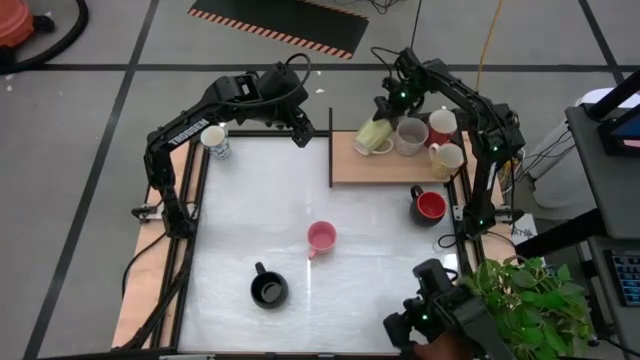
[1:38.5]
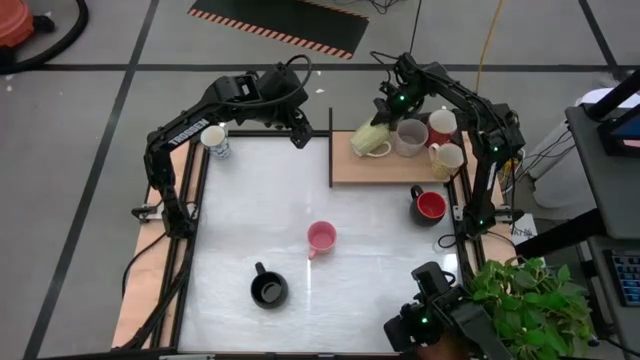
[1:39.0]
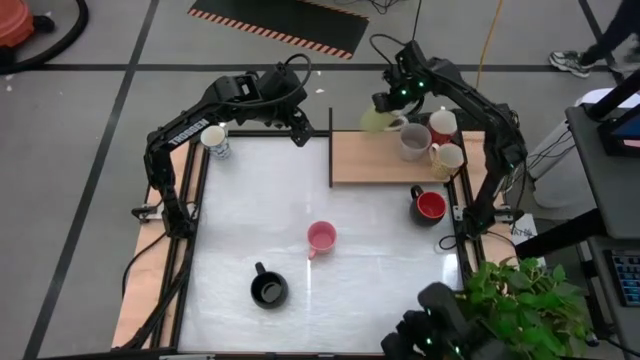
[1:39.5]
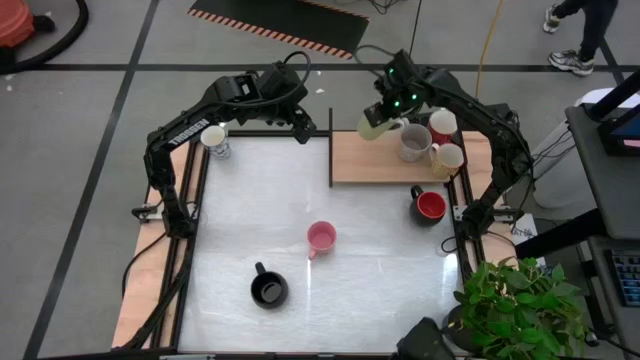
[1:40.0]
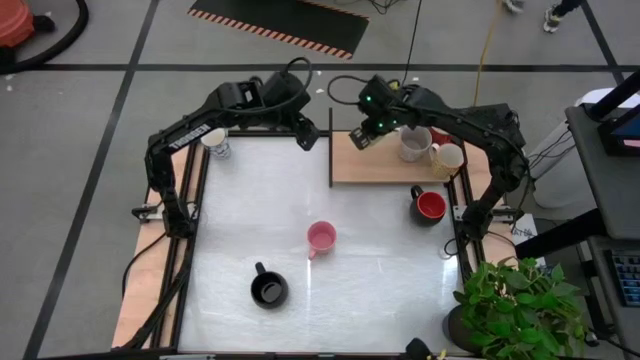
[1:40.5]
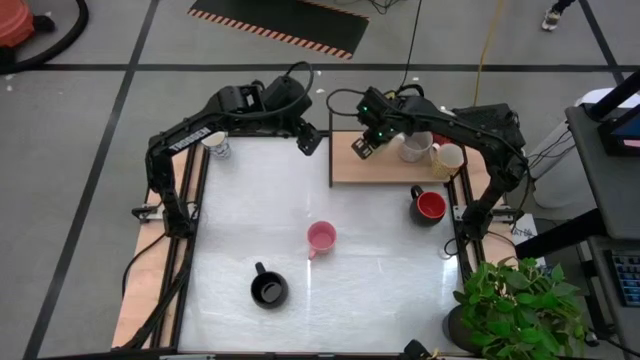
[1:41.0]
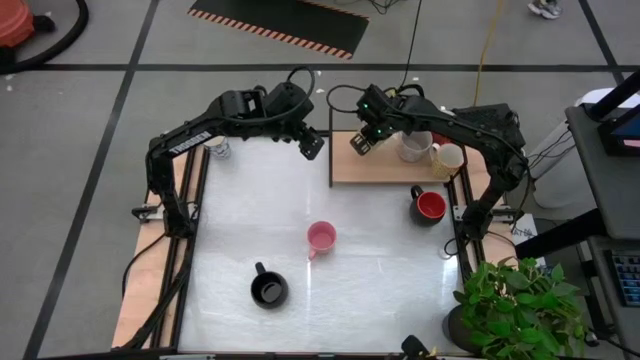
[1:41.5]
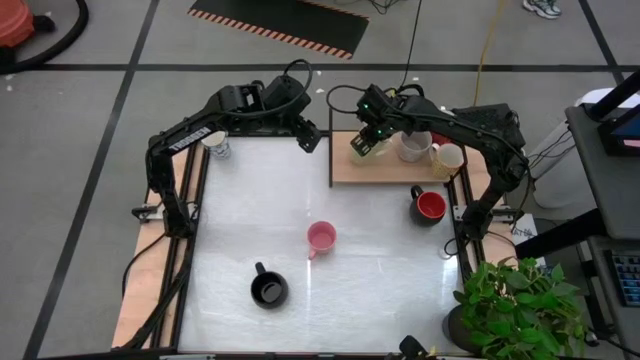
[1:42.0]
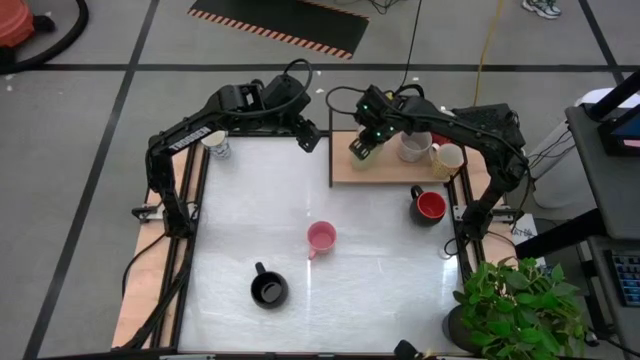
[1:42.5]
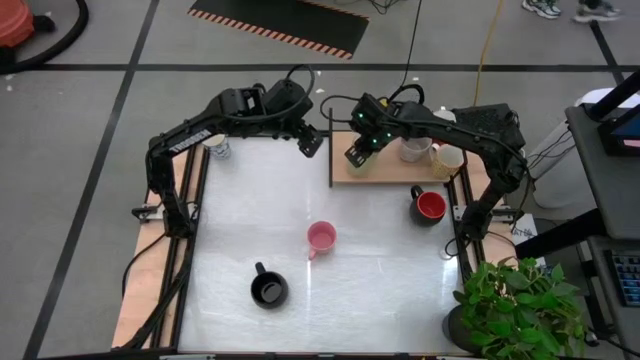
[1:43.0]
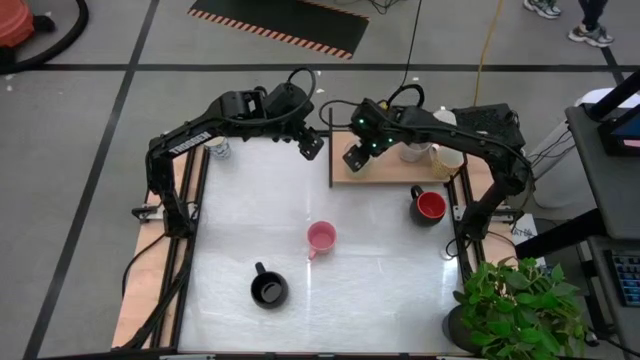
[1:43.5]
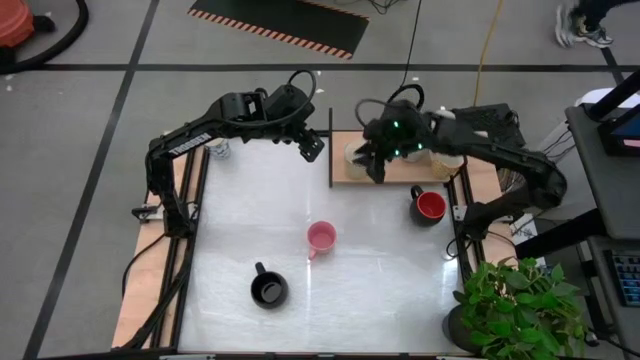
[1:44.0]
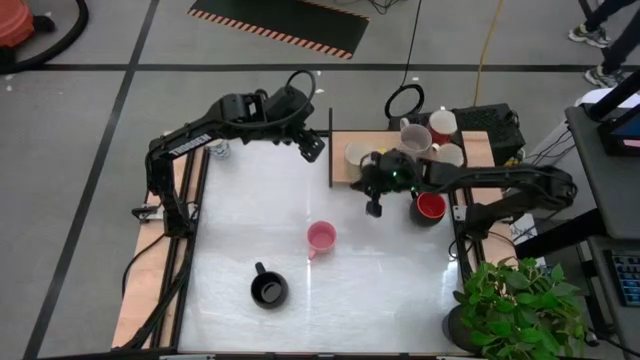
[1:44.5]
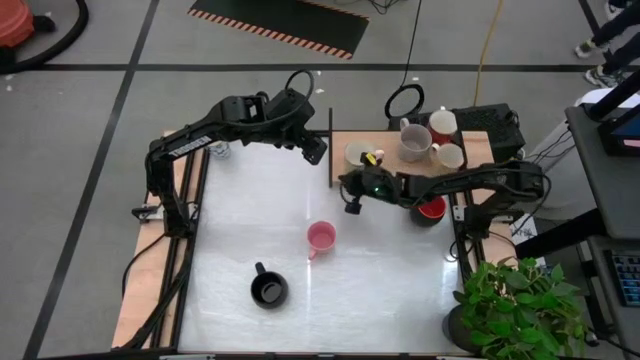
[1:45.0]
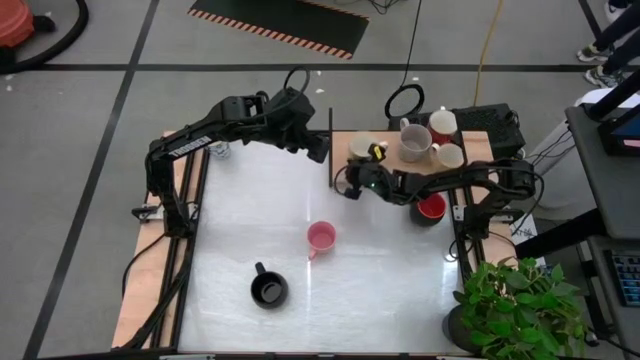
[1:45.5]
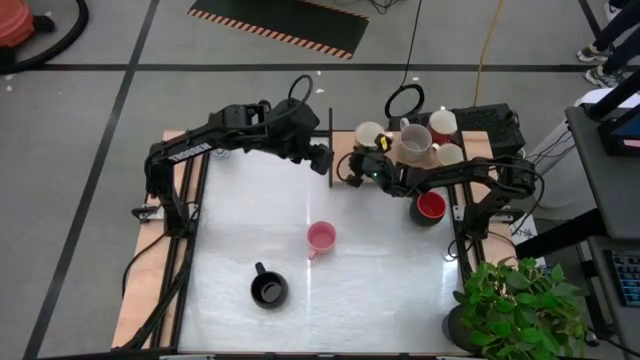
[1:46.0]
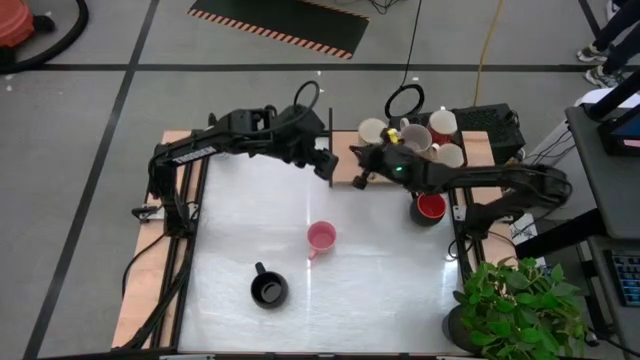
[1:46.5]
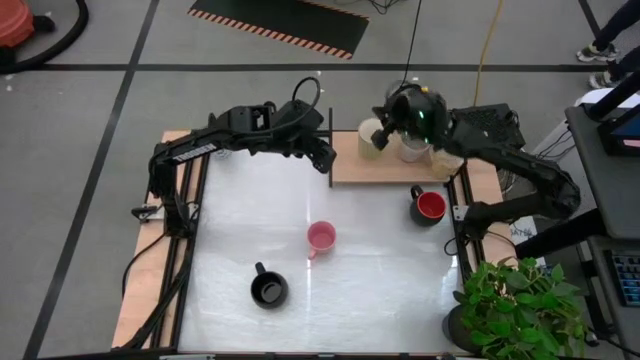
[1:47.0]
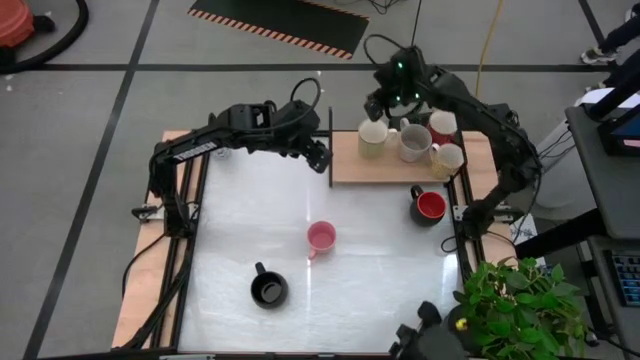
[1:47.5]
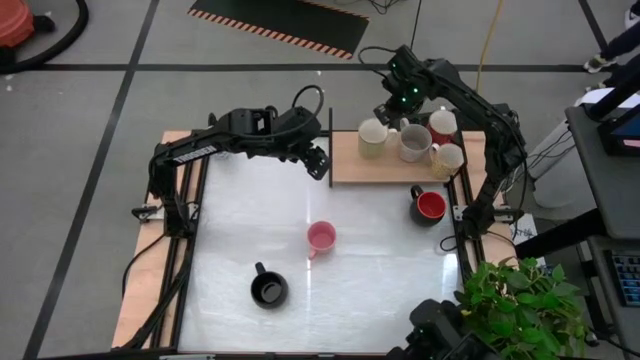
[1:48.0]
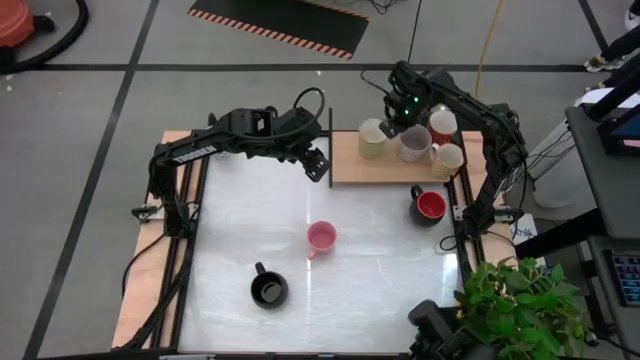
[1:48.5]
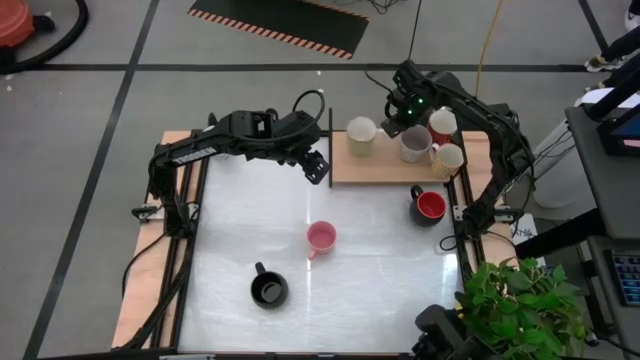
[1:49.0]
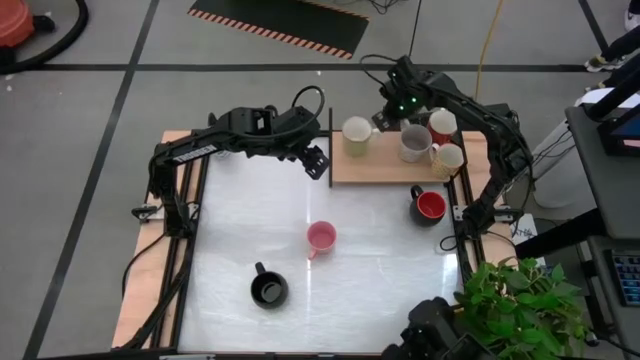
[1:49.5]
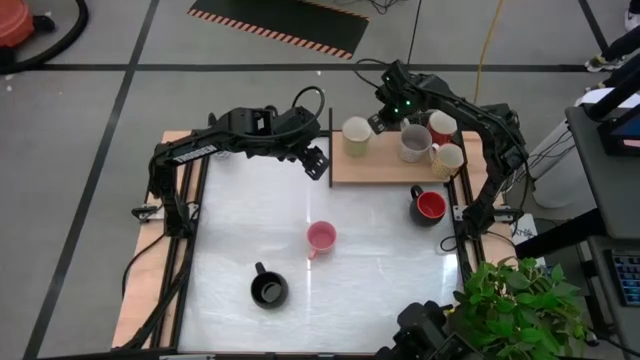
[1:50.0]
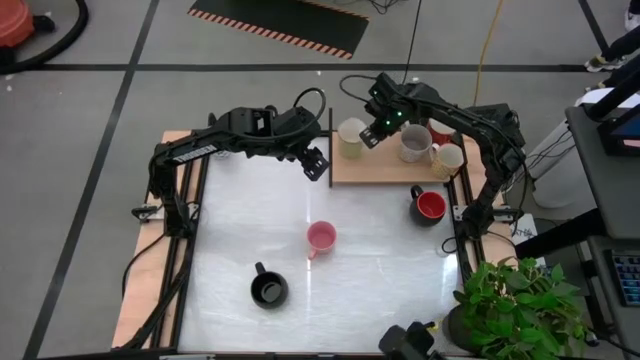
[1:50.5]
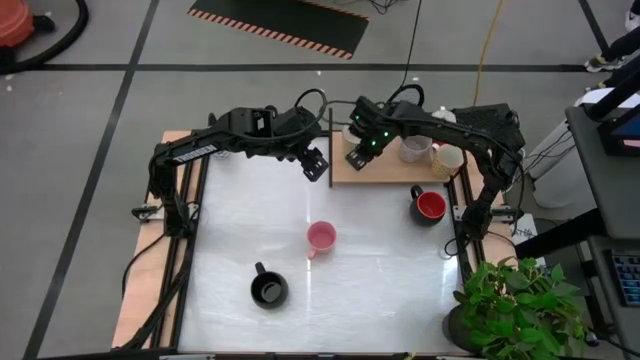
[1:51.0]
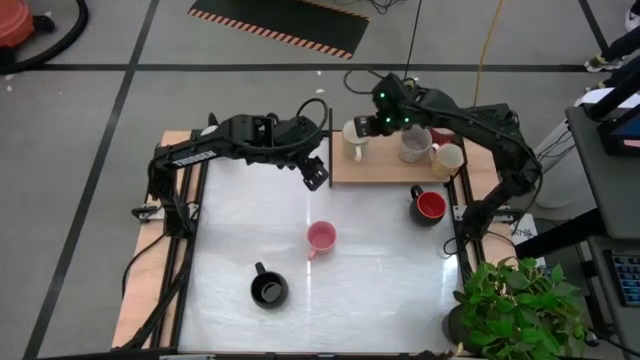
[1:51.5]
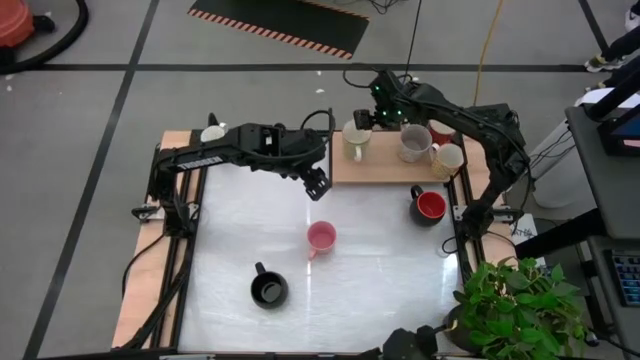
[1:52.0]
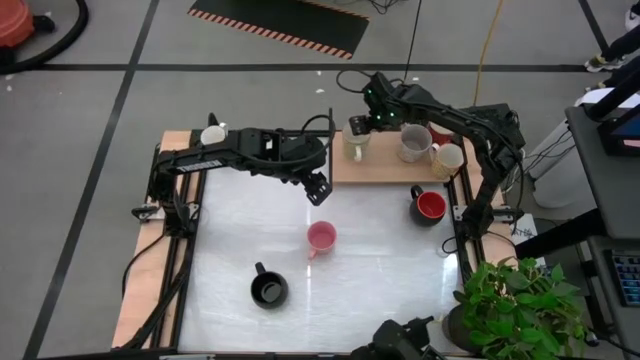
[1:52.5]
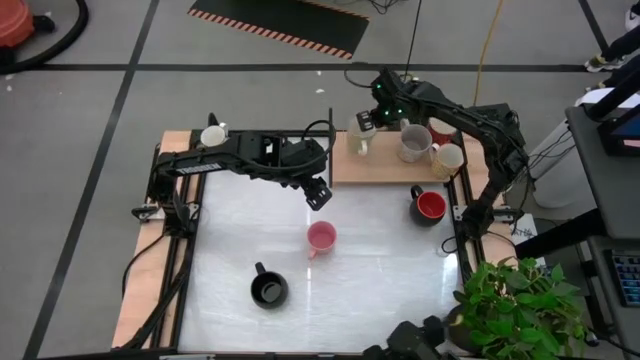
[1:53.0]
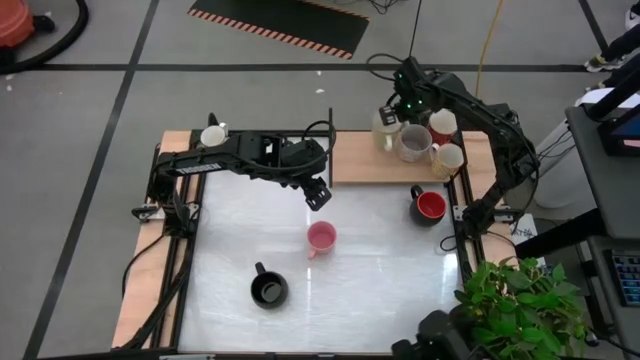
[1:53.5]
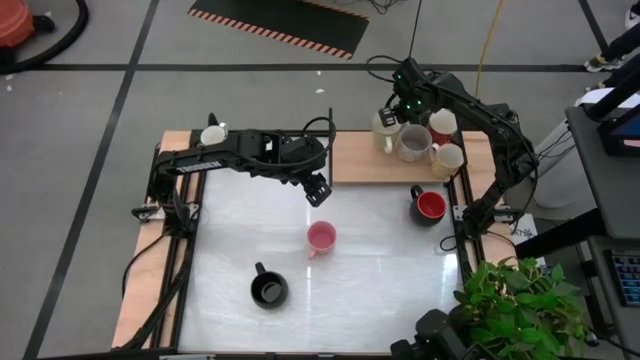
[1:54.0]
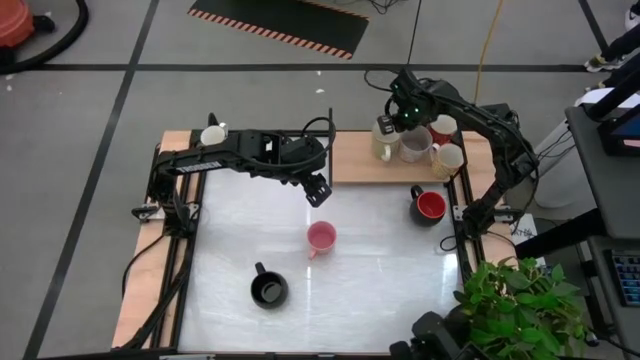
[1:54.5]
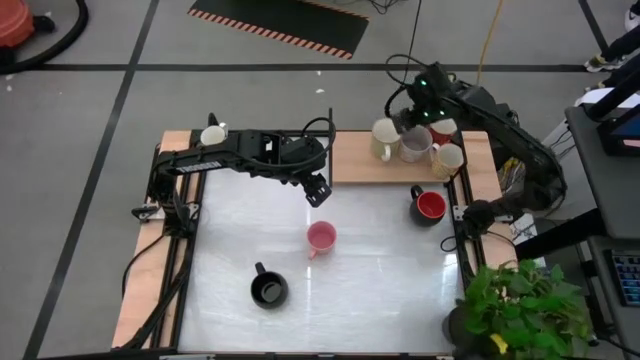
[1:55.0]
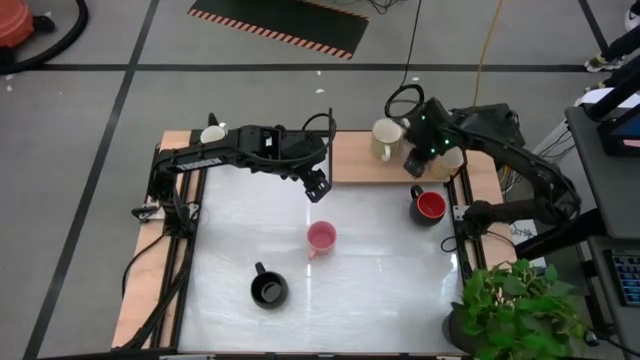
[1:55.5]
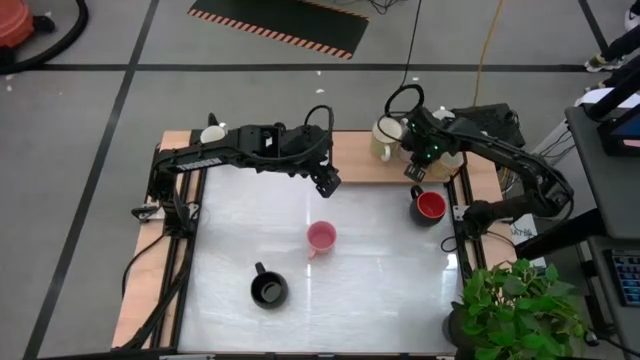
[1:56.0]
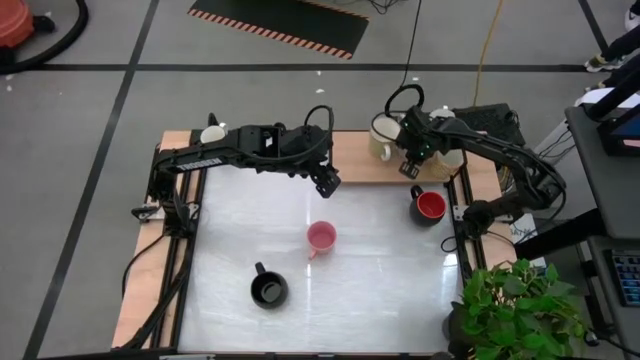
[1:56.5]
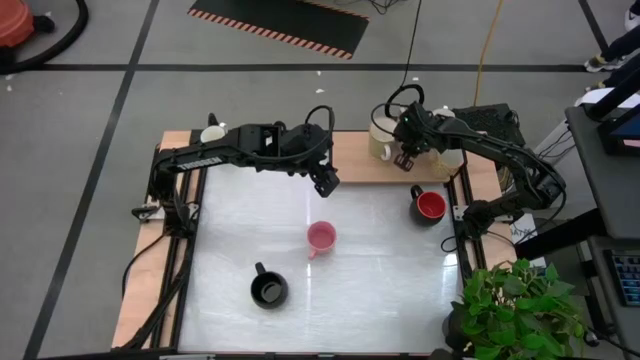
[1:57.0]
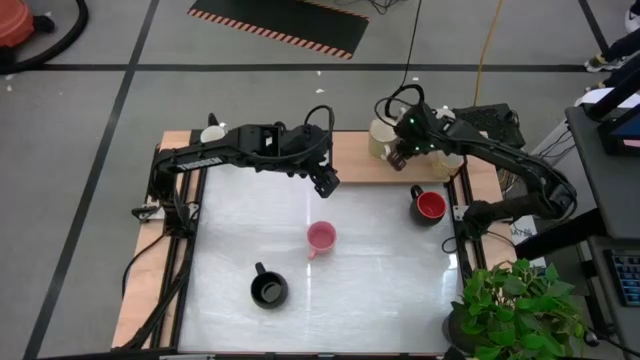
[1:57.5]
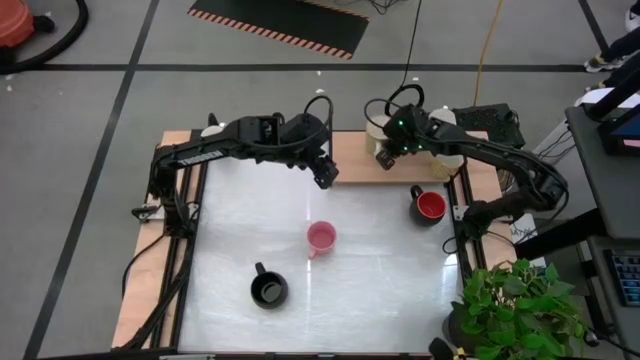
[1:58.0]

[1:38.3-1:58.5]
Task: Place coffee mugs
Put the green mug on the shelf

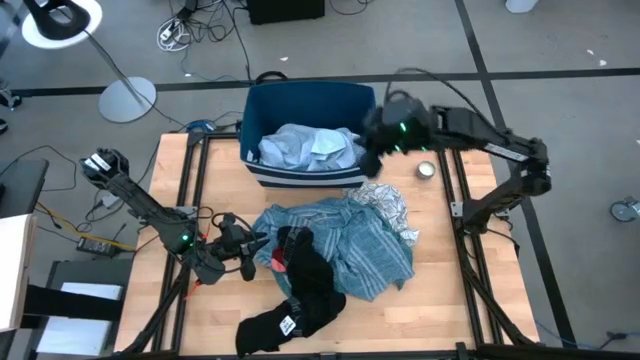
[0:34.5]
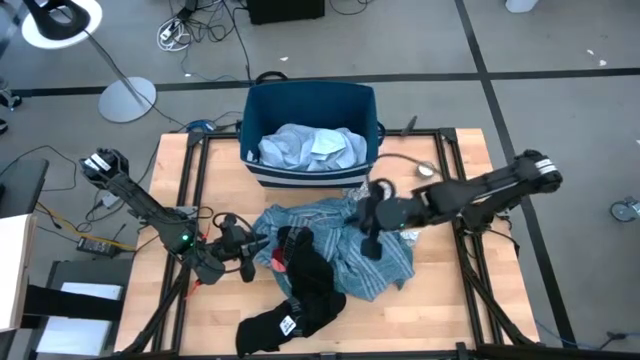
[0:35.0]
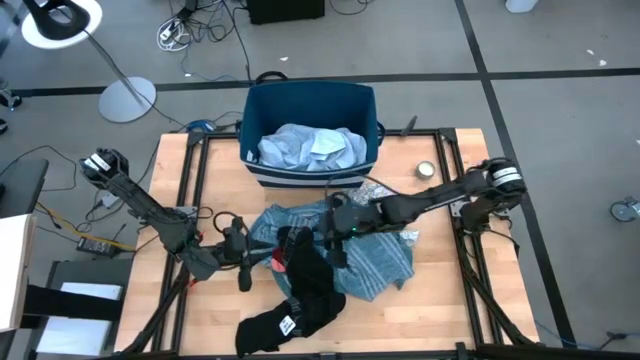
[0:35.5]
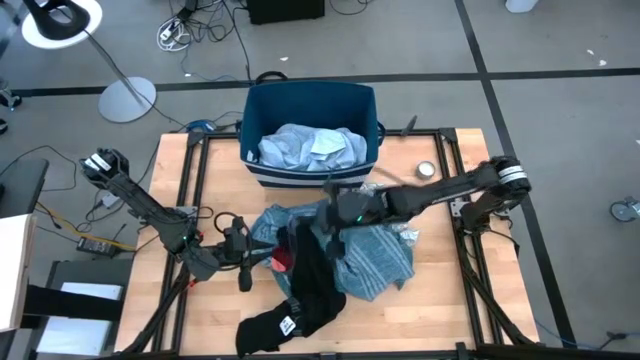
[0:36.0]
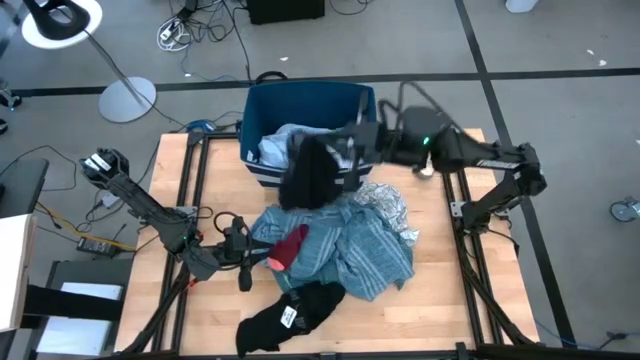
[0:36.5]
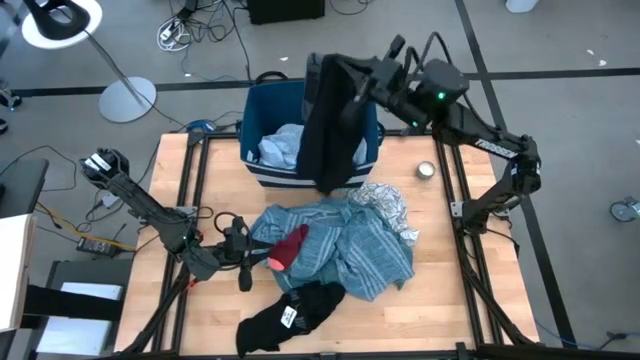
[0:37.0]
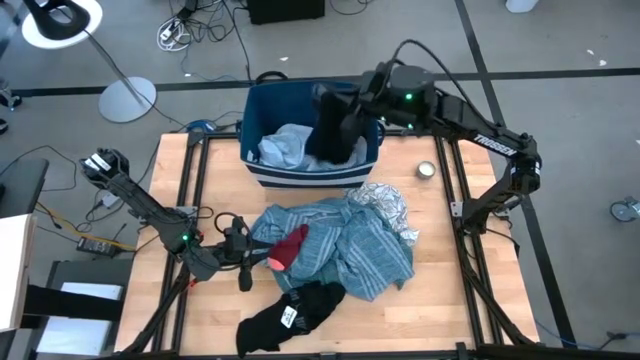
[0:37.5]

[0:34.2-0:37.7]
Task: Sort clothes
Put the black boxer into the blue laundry organizer
